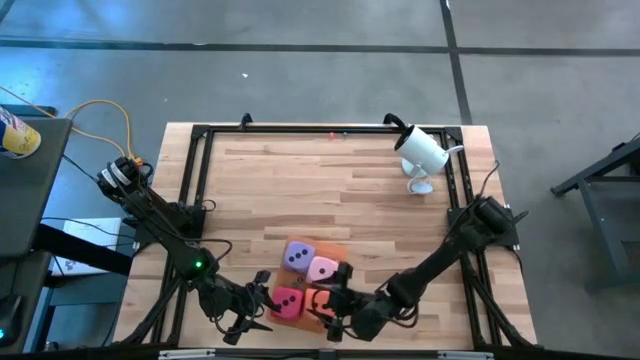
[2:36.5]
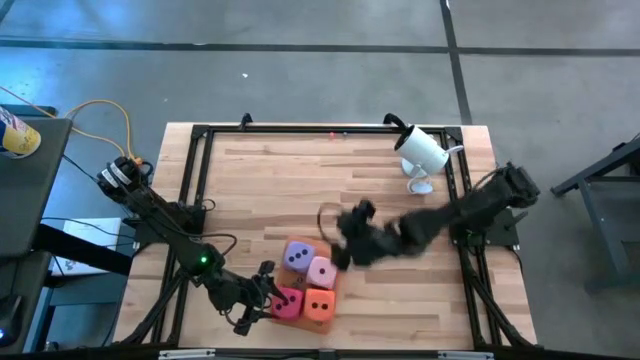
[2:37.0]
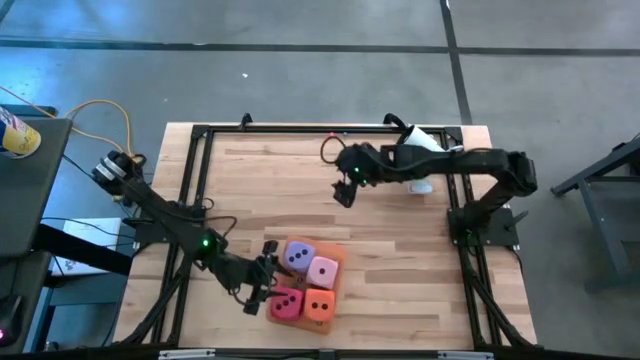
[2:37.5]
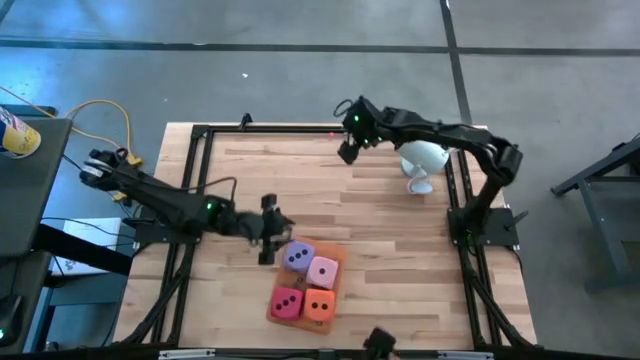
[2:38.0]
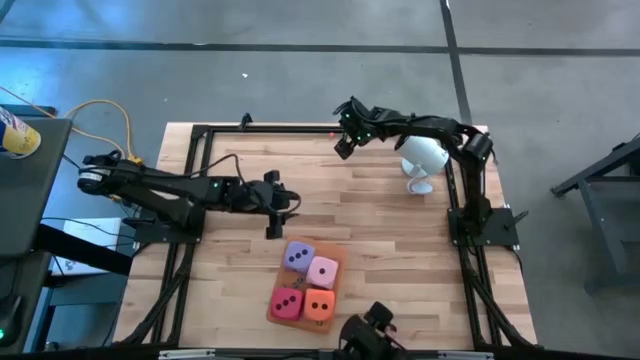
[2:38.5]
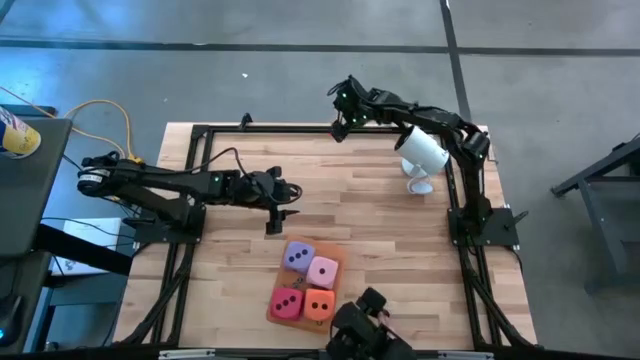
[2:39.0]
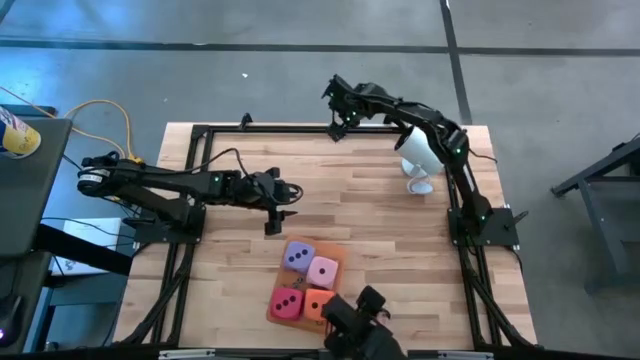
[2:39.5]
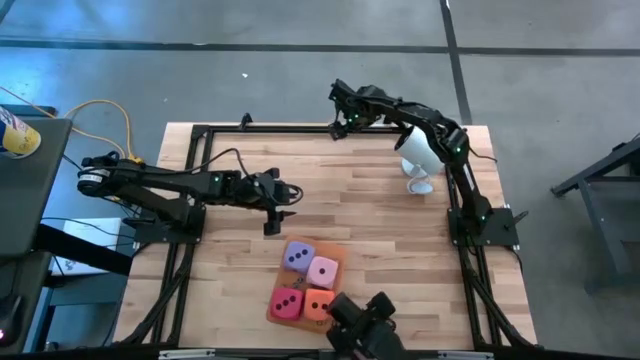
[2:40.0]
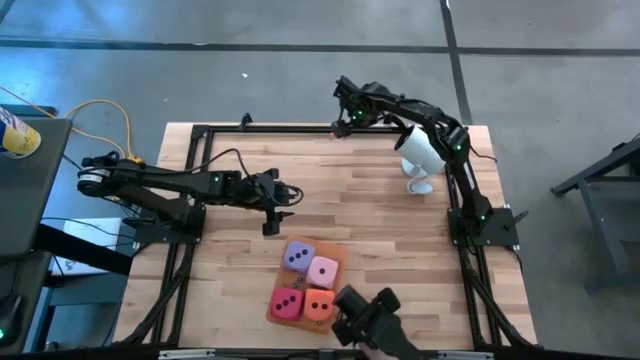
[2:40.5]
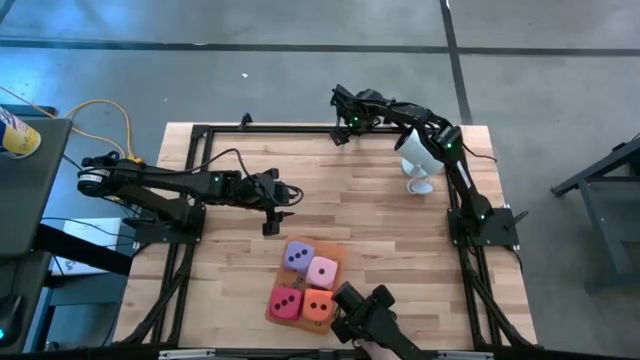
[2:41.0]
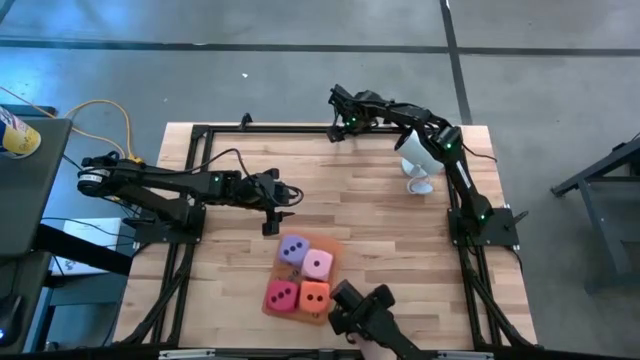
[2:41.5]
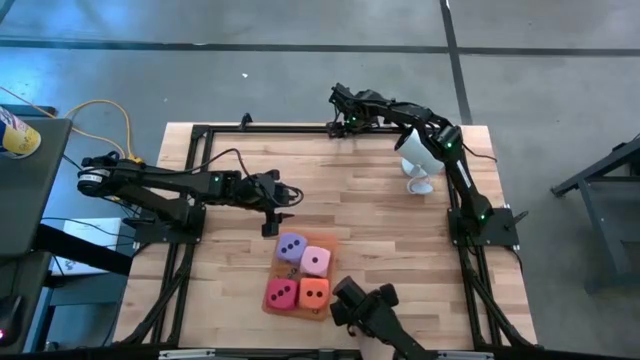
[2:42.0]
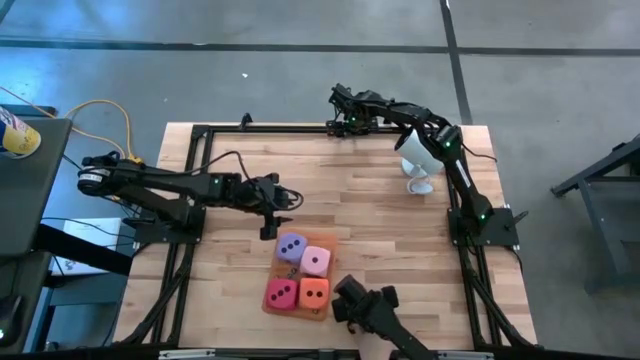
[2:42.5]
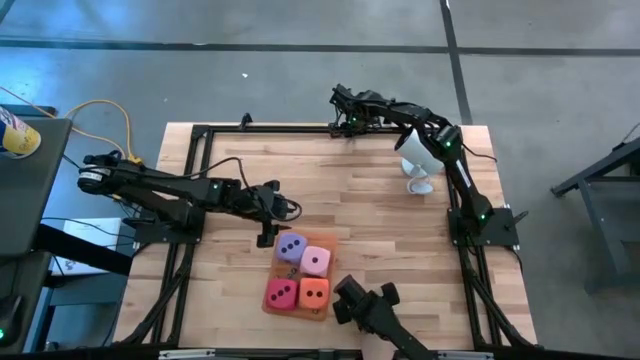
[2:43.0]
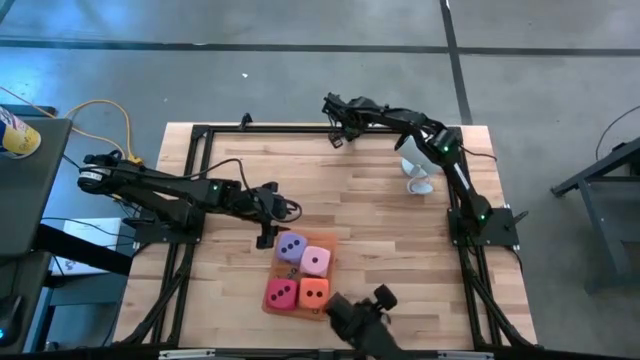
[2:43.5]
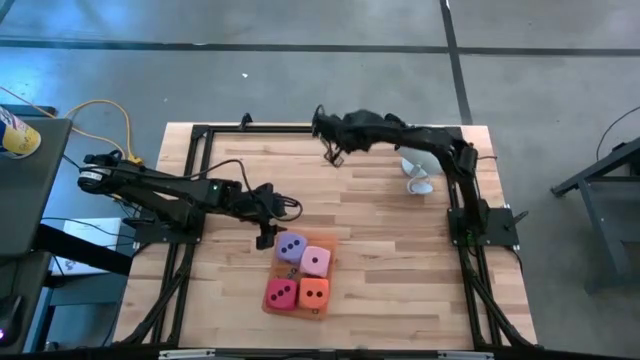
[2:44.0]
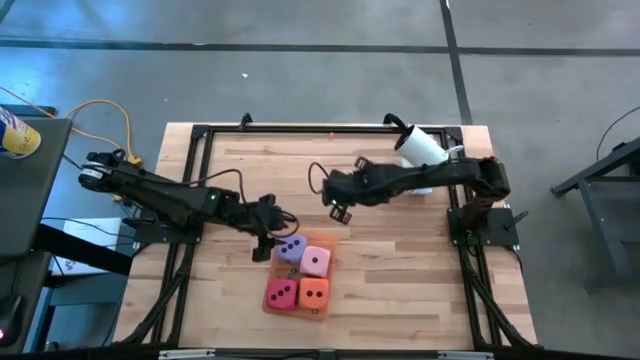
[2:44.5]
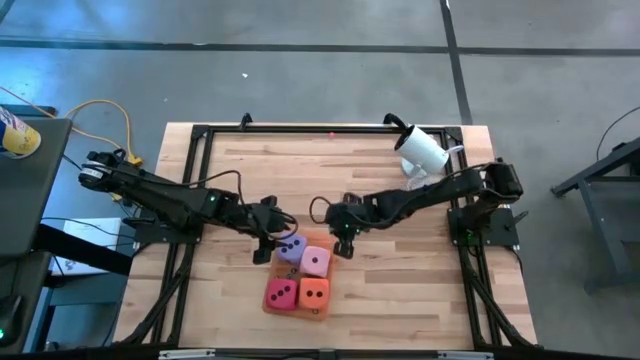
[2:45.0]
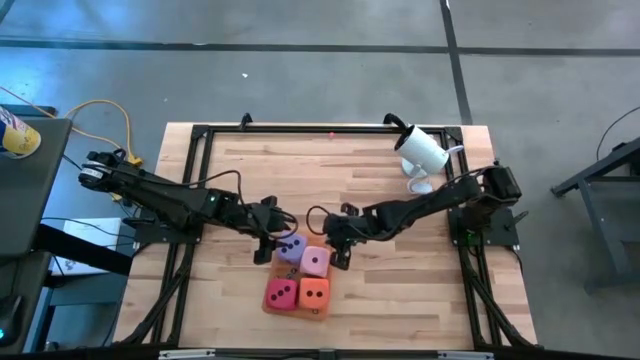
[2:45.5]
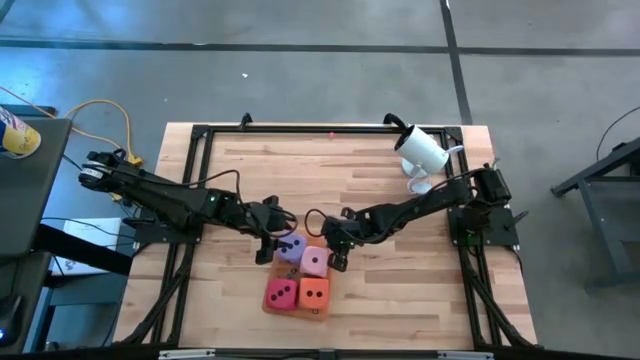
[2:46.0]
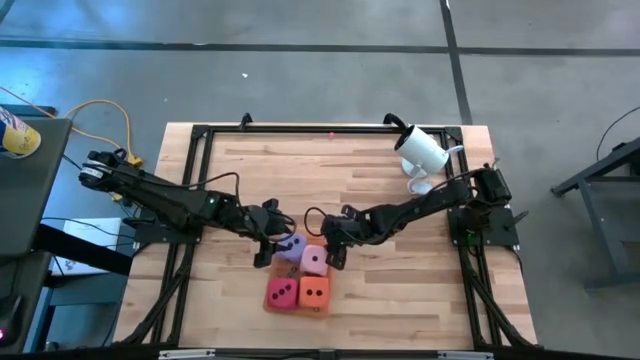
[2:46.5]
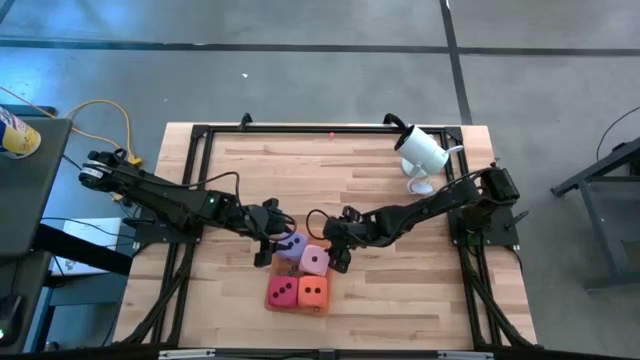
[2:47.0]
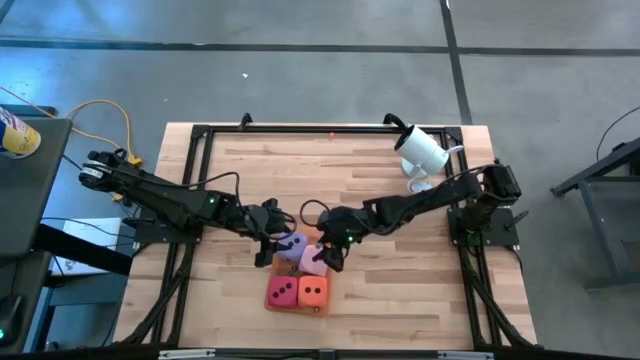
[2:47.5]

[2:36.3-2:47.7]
Task: Pick & Place Dice
Put the small light blue dice into the orange bin

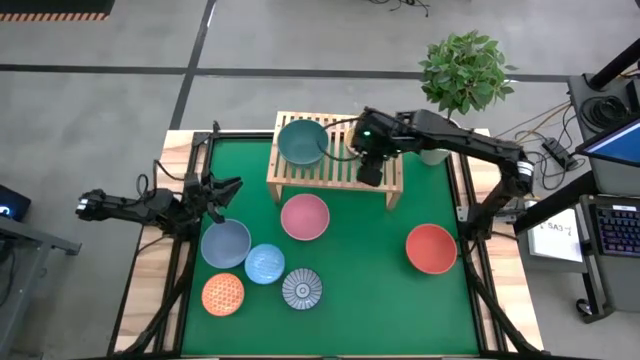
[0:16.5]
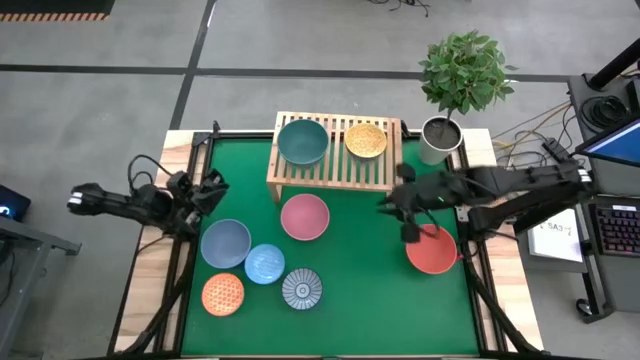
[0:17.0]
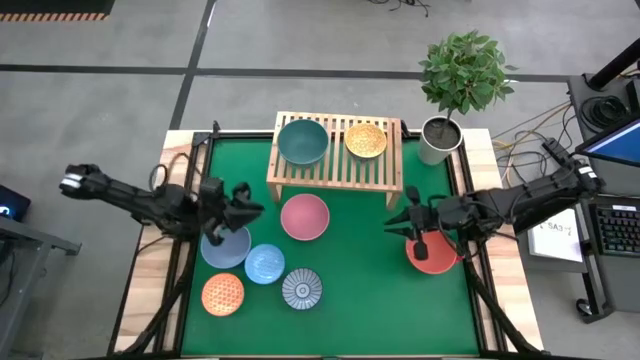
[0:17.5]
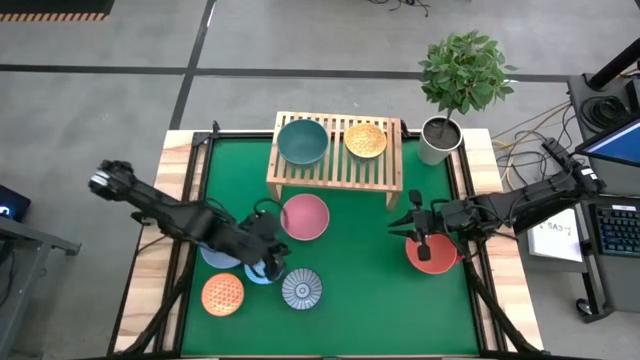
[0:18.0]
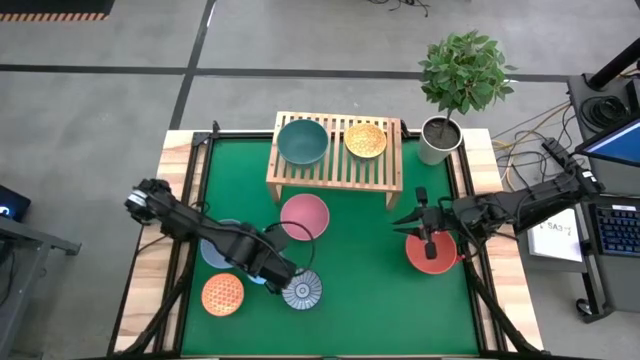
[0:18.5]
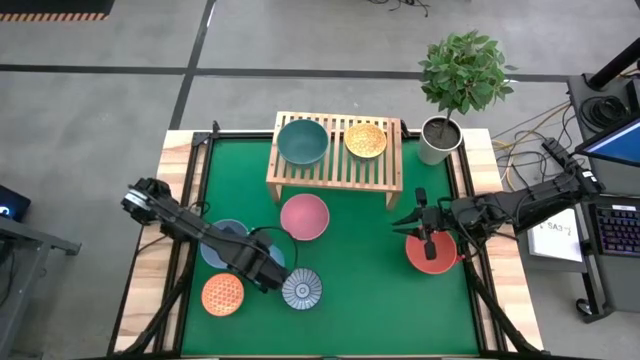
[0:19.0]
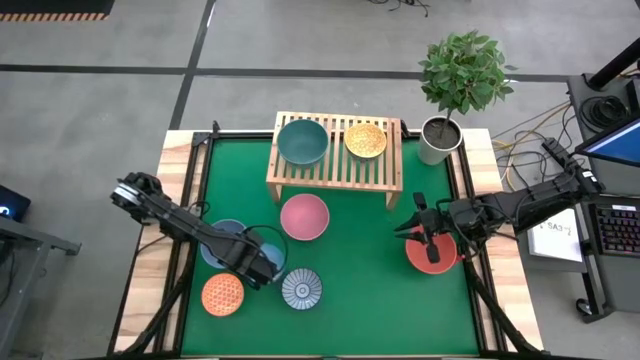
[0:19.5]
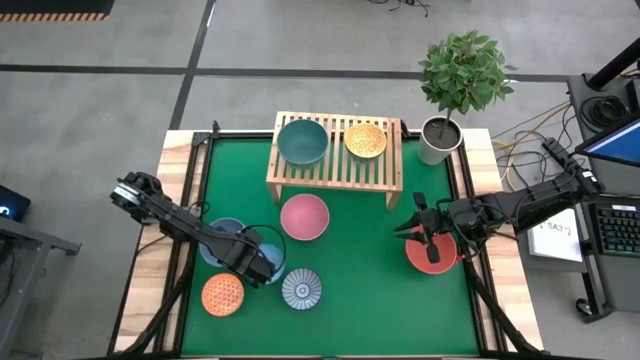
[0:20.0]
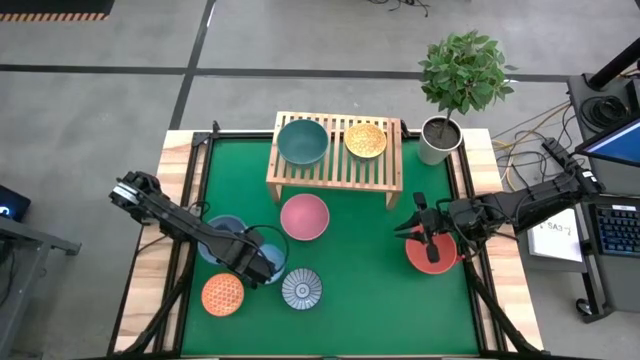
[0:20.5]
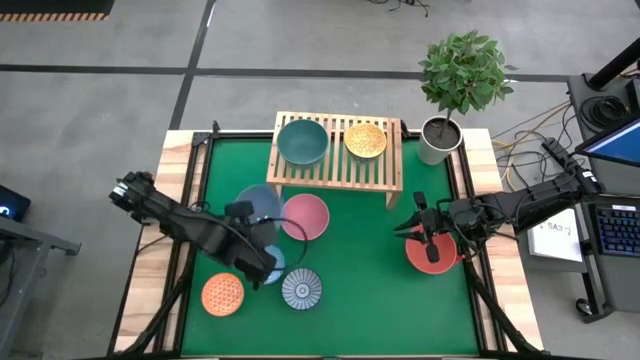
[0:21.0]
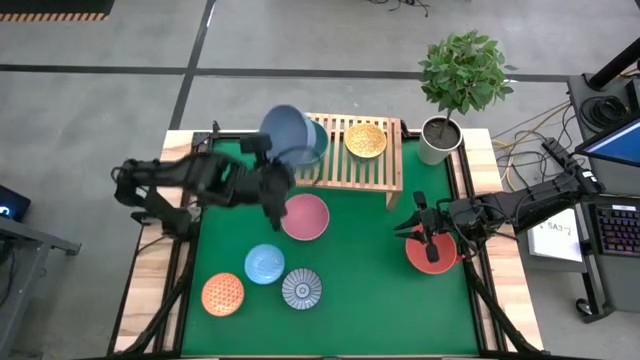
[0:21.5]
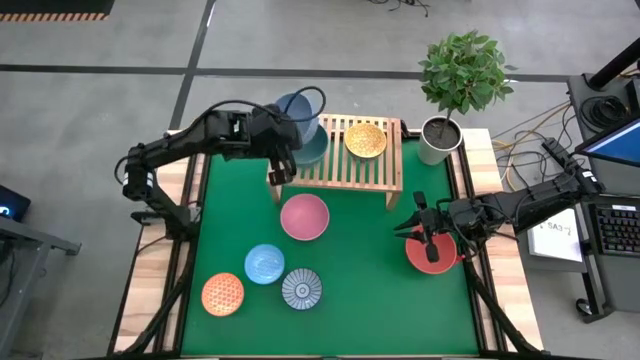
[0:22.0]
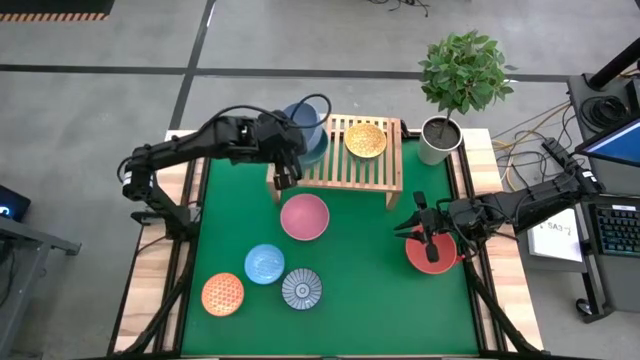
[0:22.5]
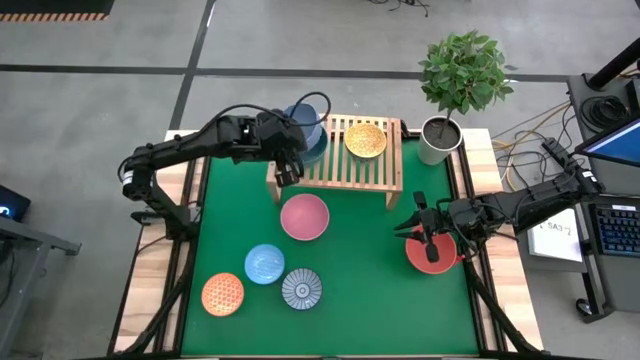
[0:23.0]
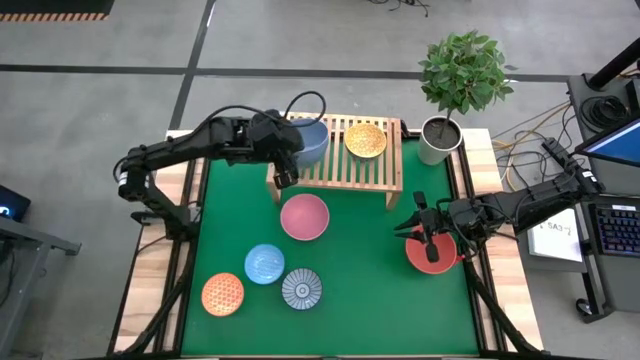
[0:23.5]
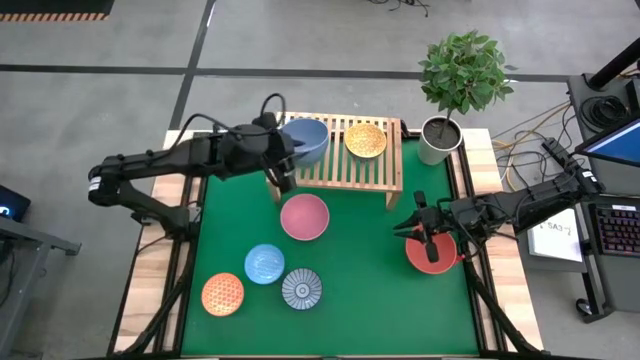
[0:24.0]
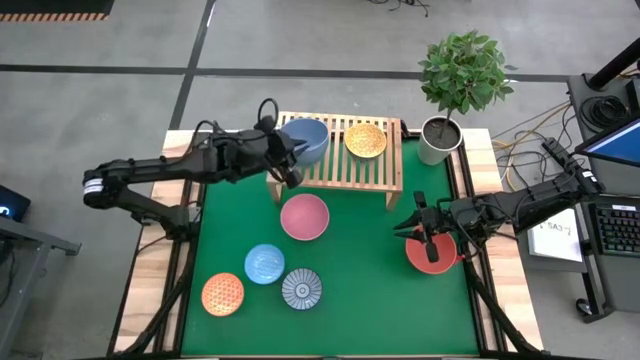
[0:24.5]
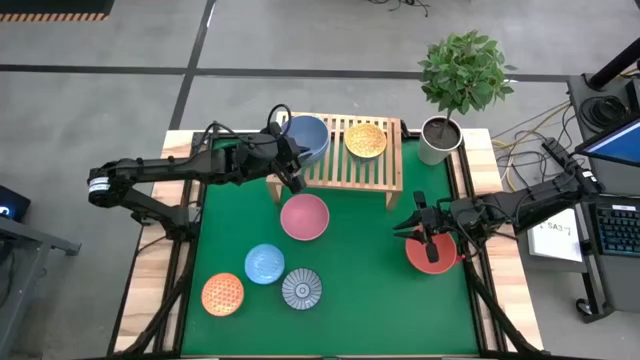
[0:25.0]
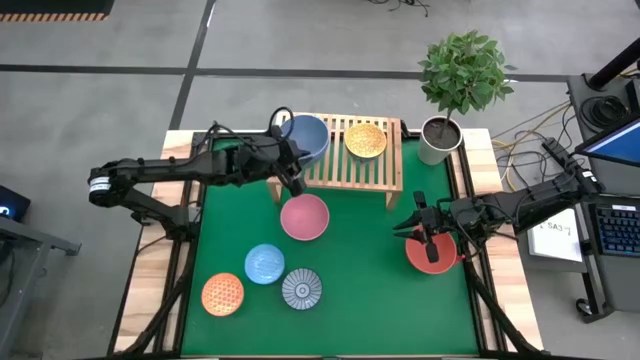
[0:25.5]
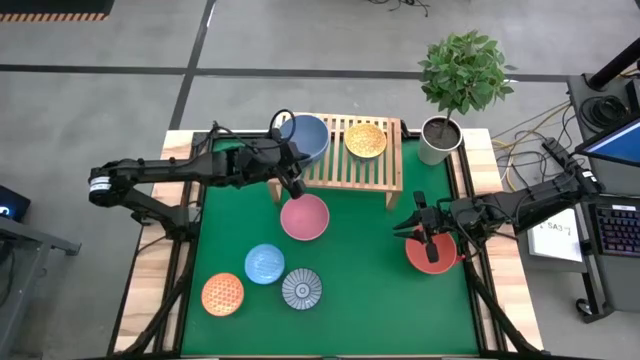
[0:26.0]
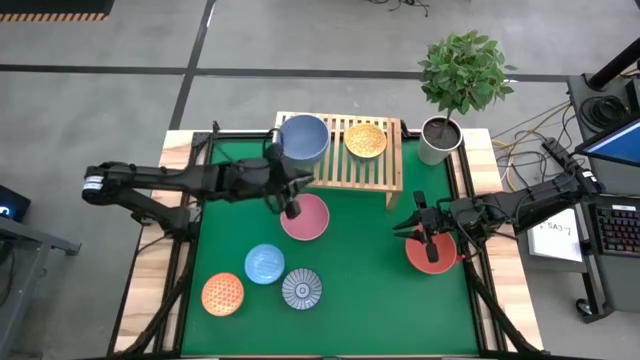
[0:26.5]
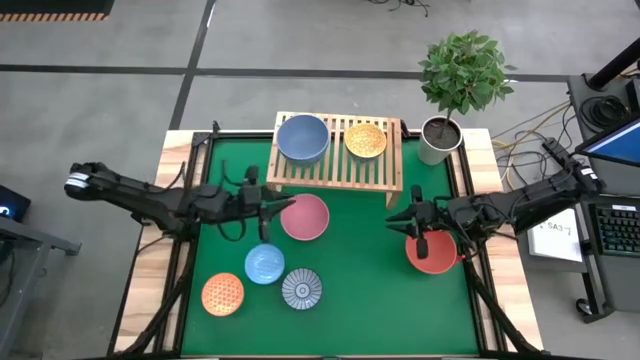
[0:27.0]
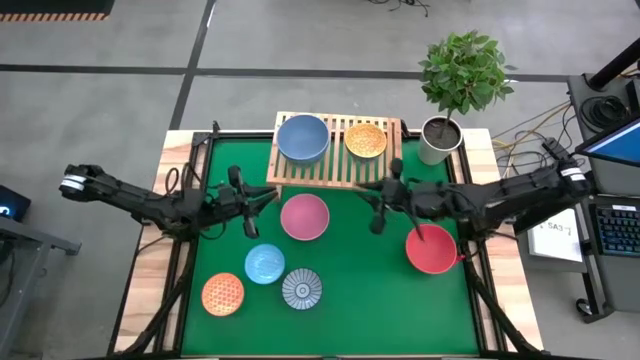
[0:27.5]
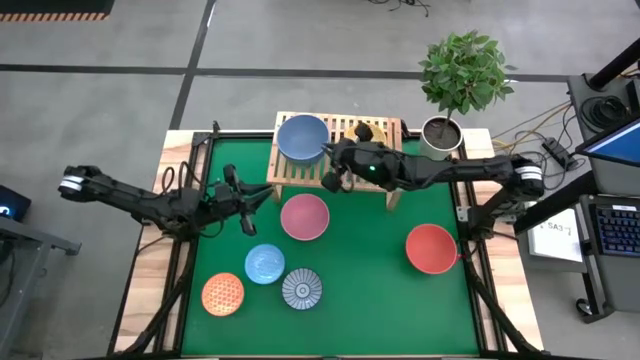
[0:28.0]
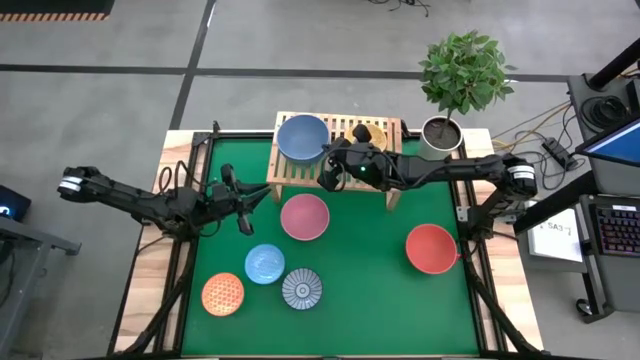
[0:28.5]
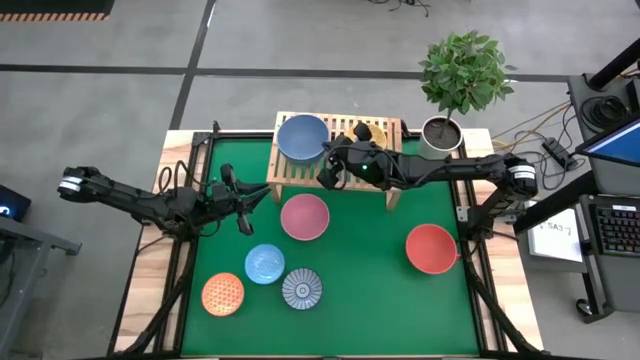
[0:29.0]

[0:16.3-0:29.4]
Task: Place and stack bowls onto a shelf
Stack the light blue bowl on top of the green bowl on the shelf
